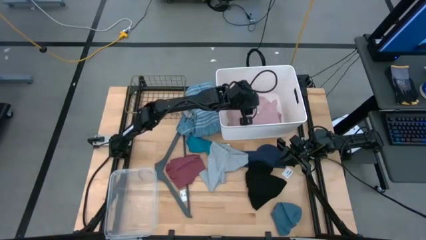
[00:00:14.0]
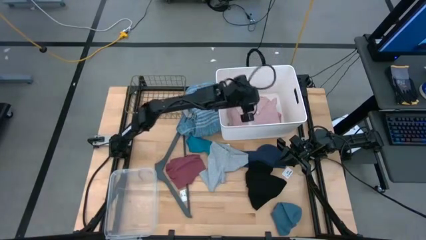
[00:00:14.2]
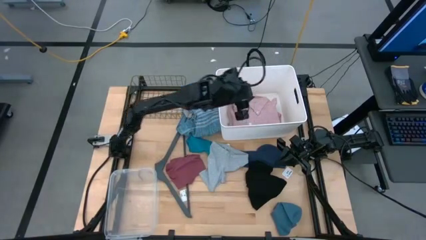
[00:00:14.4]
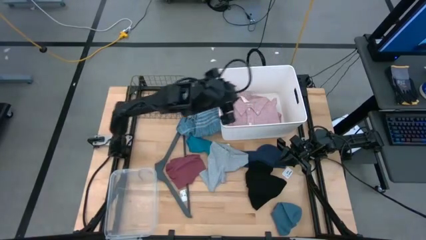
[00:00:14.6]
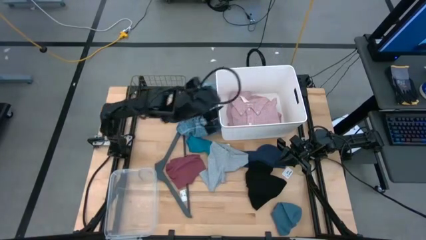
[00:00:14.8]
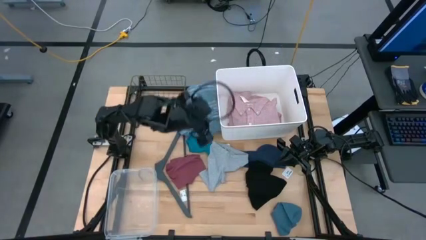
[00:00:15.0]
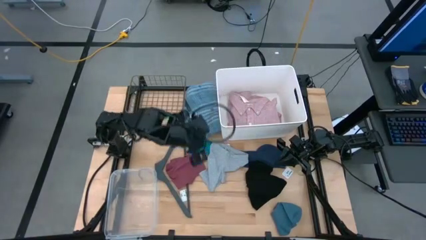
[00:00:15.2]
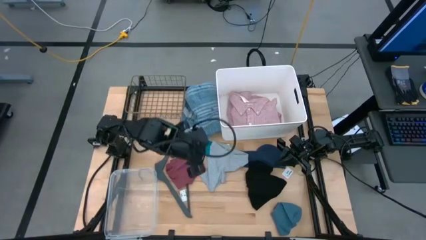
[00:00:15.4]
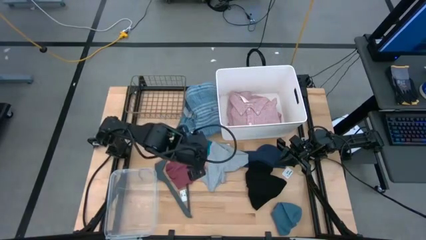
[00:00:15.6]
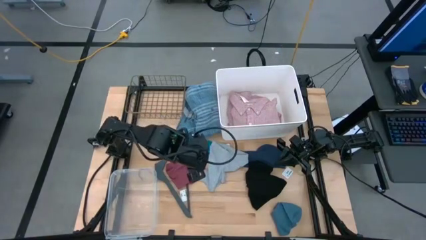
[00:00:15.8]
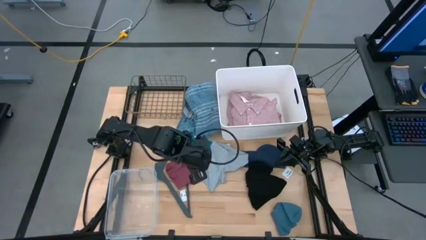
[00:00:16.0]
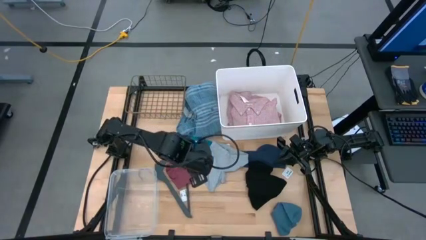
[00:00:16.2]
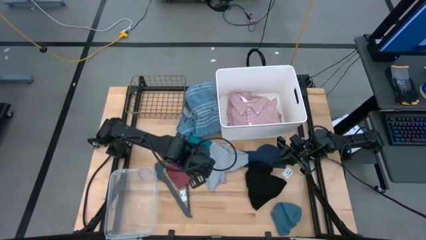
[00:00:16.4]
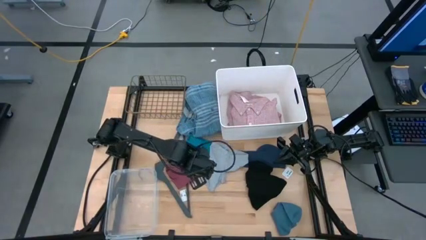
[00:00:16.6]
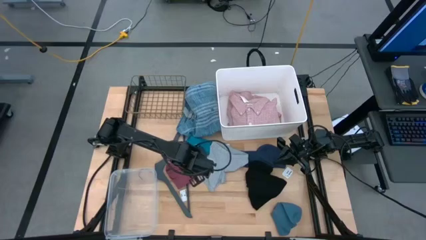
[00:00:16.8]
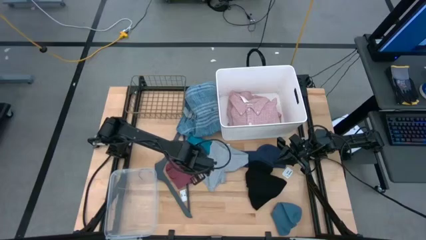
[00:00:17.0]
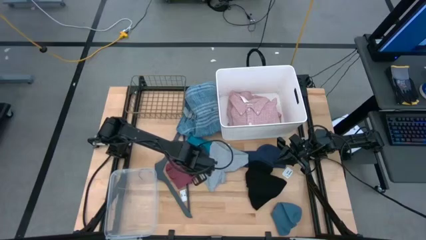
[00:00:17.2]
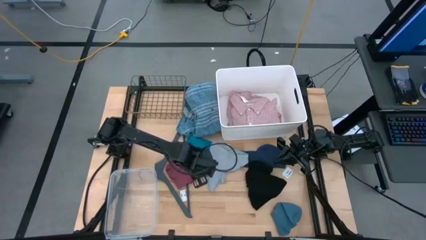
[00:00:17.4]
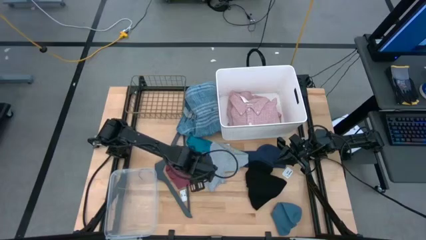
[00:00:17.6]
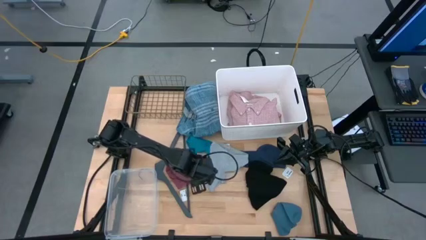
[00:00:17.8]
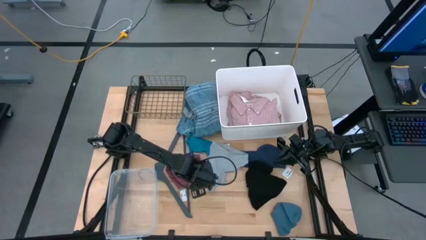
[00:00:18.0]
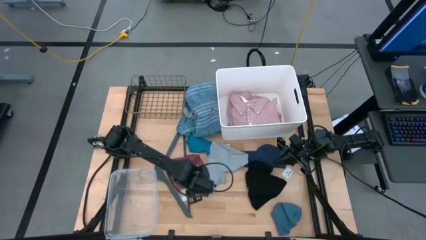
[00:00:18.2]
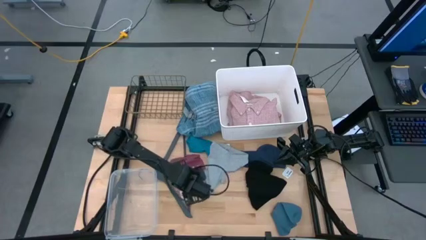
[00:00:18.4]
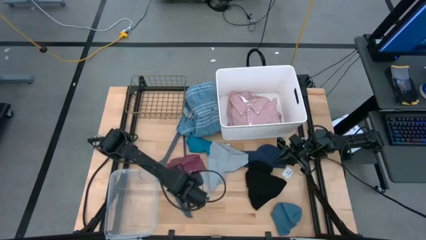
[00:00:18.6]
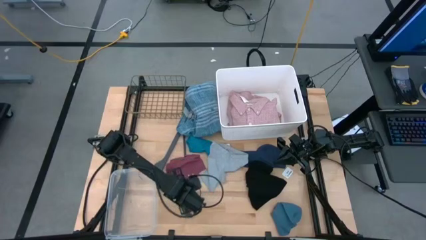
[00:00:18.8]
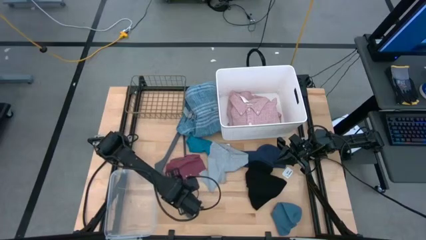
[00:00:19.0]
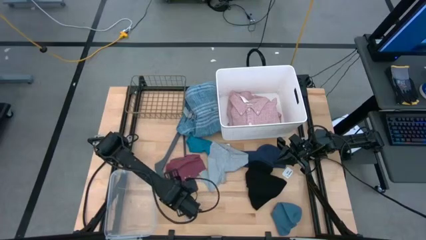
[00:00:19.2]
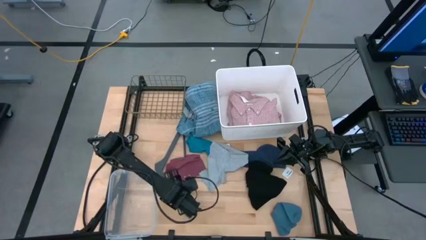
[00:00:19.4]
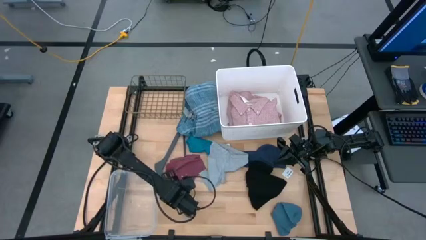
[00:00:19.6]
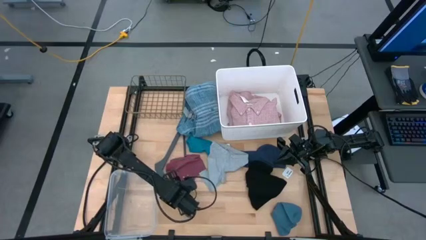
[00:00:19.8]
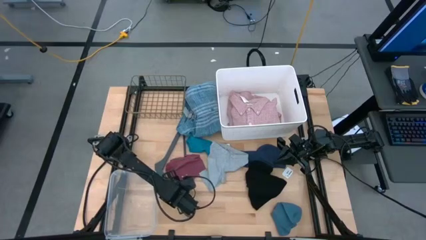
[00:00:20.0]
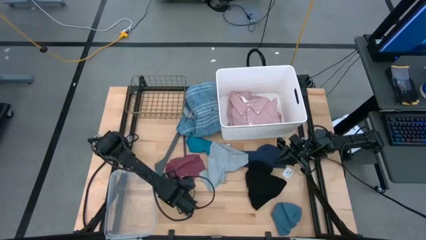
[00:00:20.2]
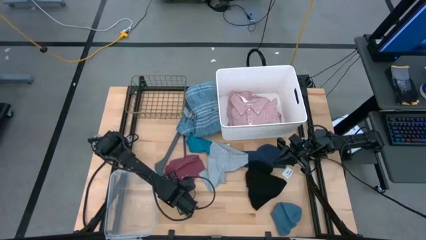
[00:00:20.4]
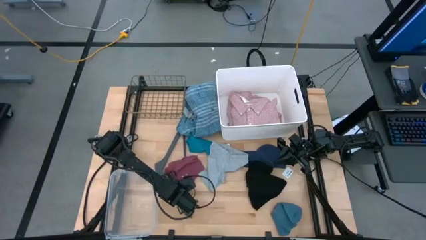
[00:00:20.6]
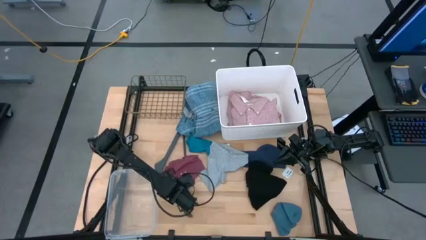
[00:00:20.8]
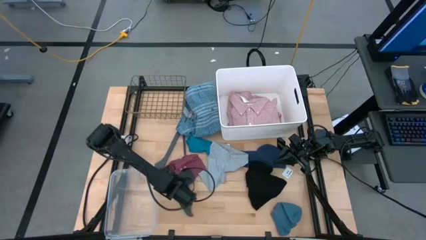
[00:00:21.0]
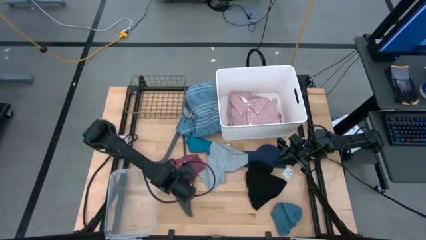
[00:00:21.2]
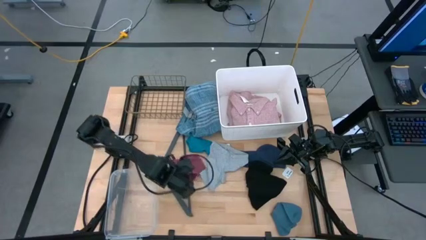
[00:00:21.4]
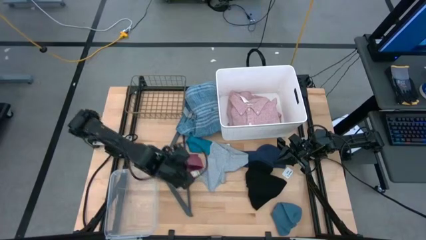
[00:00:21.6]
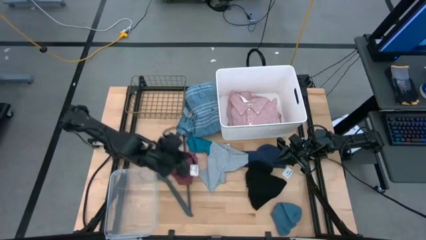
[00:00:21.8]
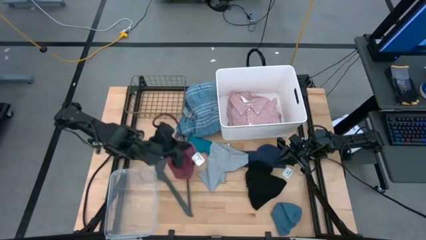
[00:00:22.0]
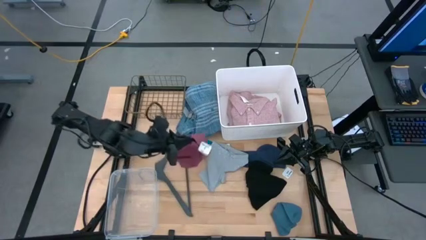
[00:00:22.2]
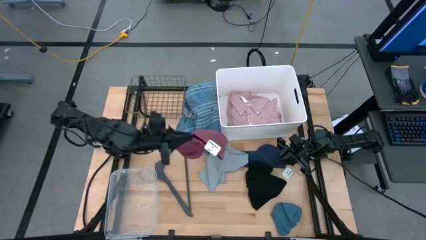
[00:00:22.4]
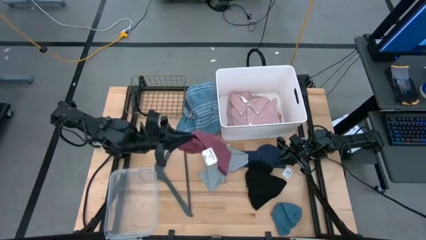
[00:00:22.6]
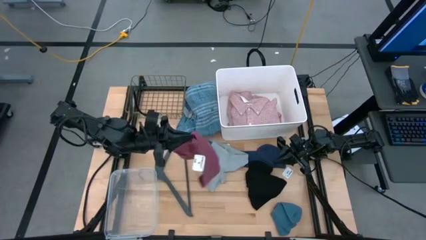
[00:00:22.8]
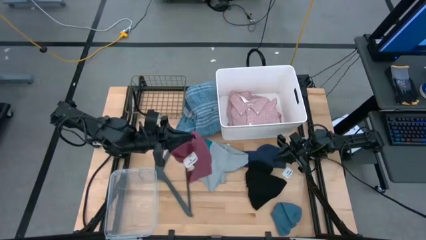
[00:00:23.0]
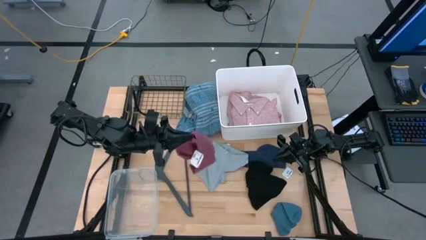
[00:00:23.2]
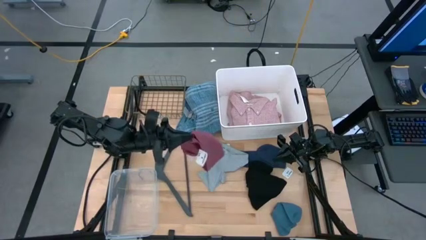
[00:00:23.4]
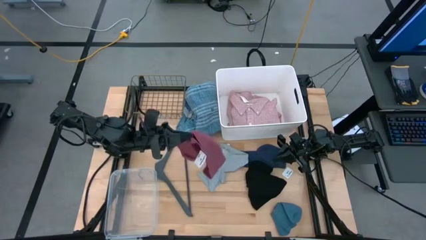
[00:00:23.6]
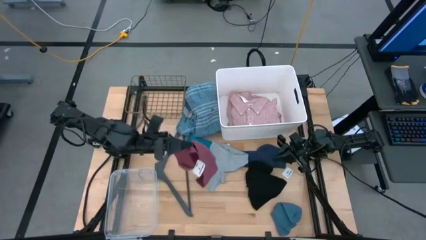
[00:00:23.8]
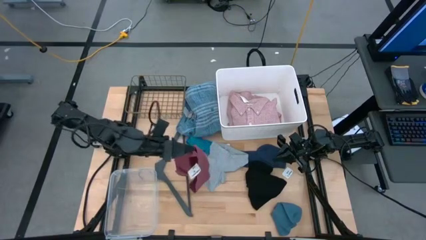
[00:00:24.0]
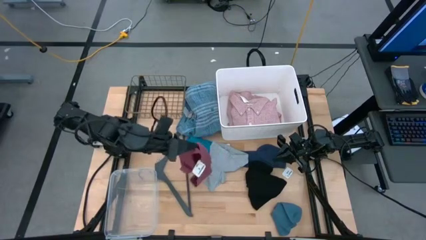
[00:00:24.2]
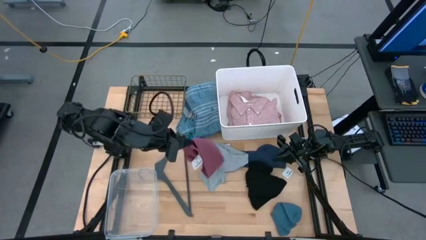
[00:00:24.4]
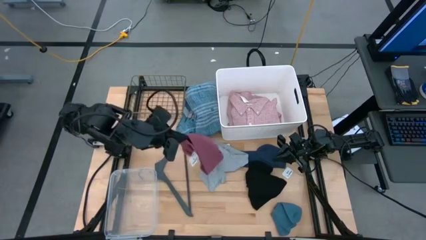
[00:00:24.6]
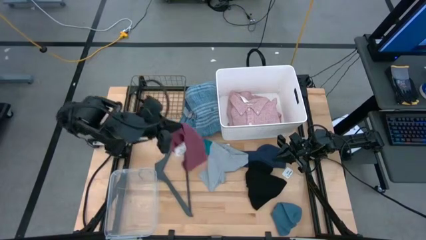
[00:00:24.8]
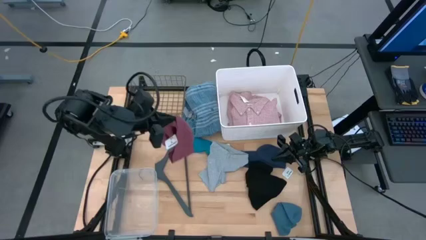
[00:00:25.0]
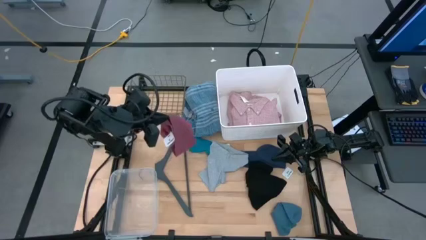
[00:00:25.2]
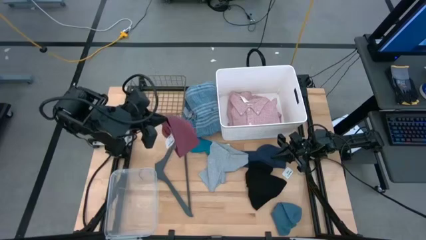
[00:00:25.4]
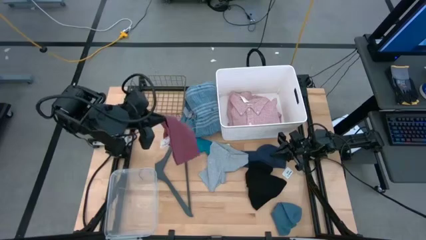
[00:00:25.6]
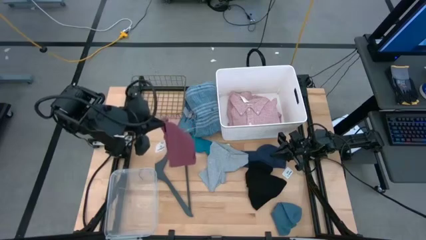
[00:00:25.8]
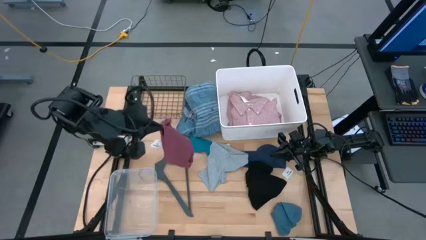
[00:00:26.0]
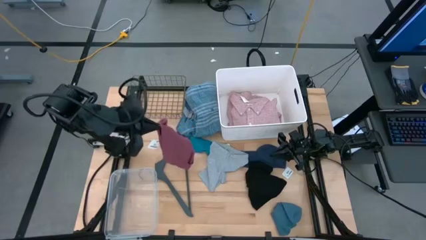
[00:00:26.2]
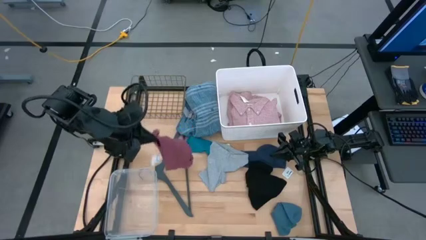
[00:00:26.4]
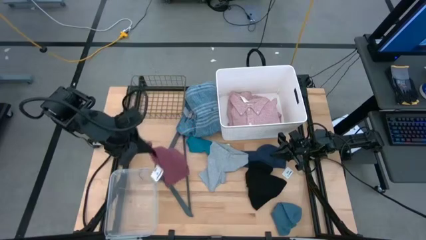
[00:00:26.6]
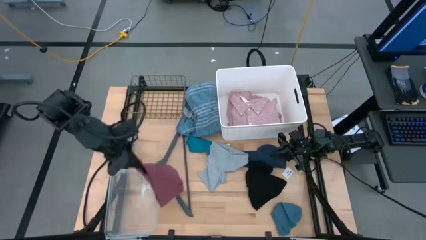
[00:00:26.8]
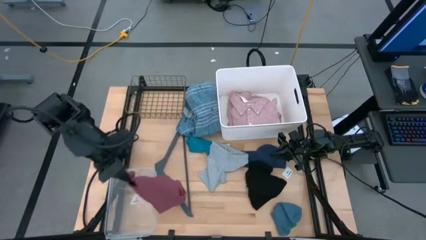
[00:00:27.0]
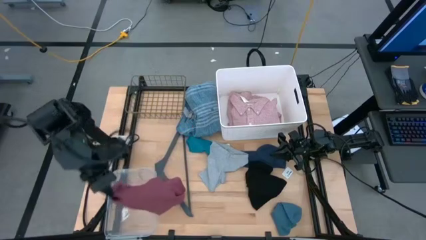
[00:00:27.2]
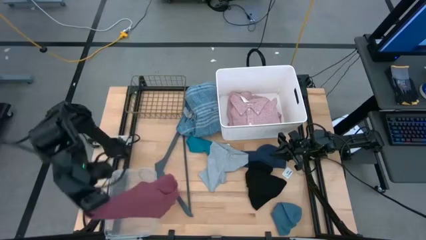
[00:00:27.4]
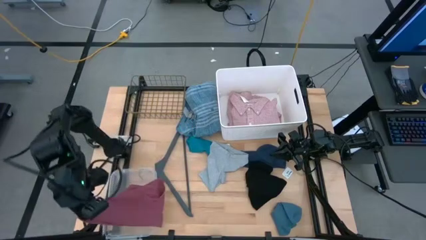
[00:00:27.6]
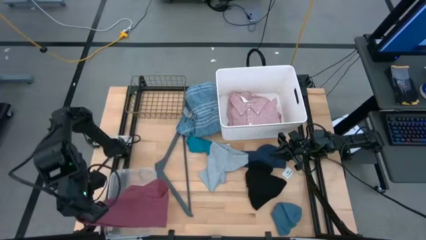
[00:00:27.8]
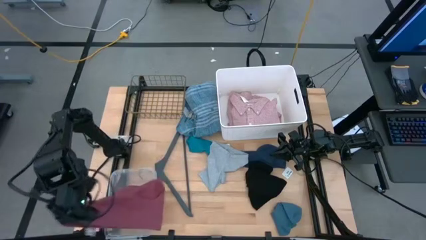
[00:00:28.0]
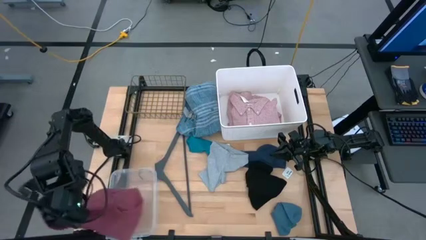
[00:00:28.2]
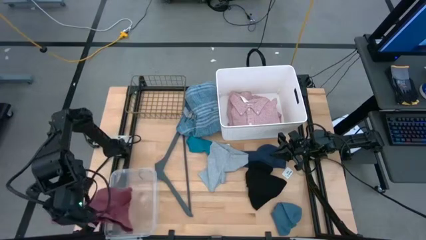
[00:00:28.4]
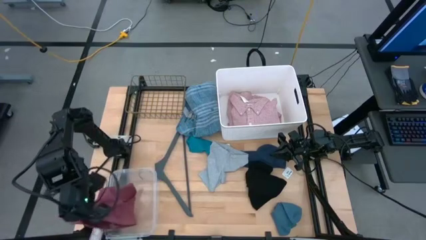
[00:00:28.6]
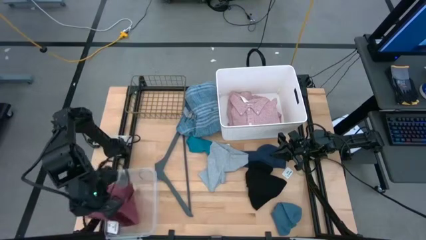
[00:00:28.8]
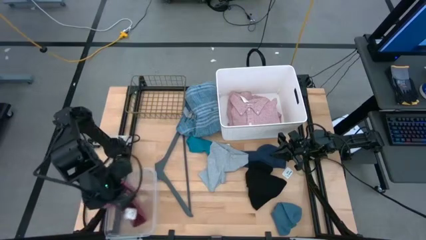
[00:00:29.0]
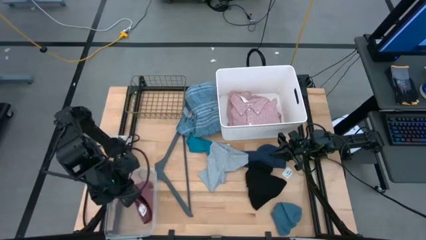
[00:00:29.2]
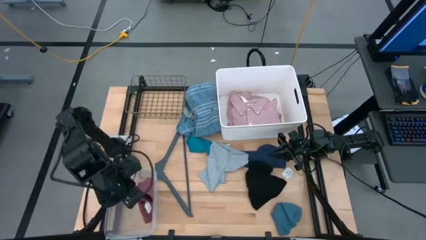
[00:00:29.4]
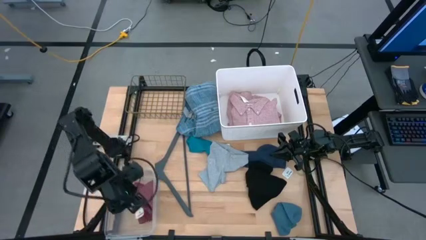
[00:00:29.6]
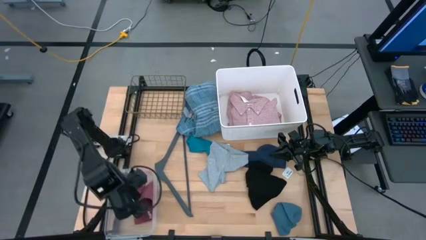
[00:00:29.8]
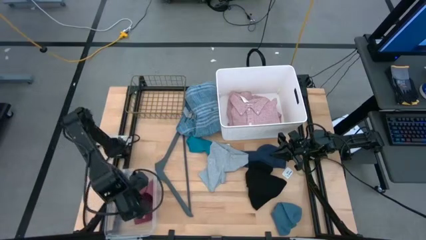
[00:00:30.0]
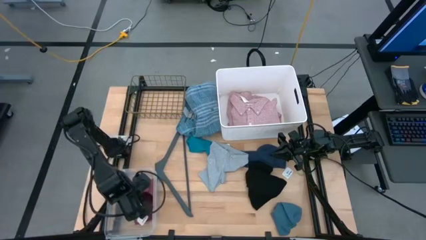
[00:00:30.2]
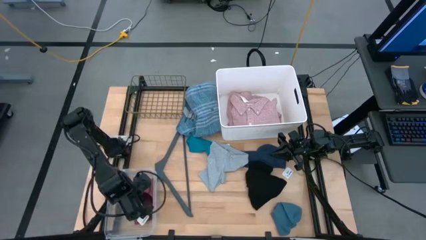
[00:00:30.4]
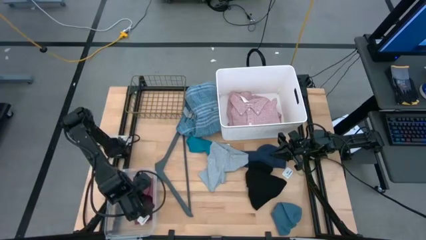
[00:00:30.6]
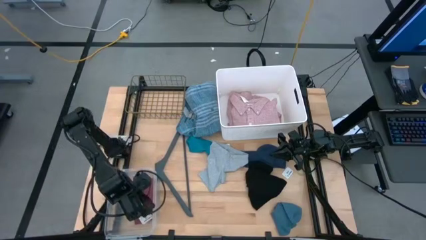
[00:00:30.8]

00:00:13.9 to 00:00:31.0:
Task: Pick & Place Cloths
Put the pink boxers into the transparent bin
